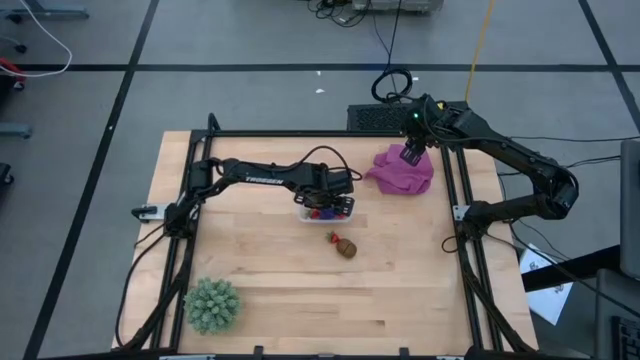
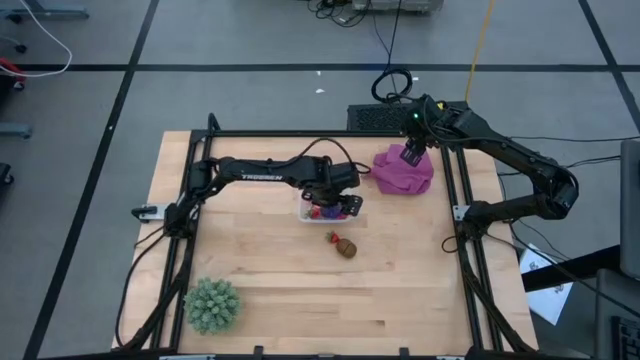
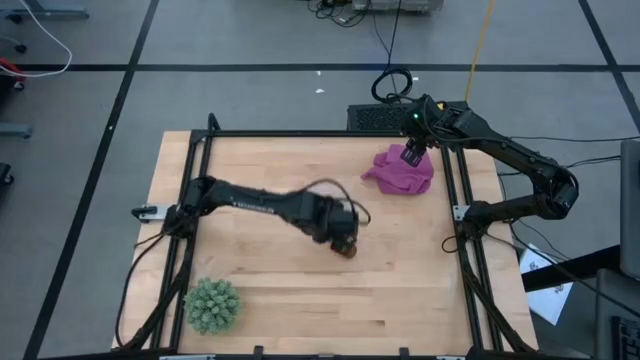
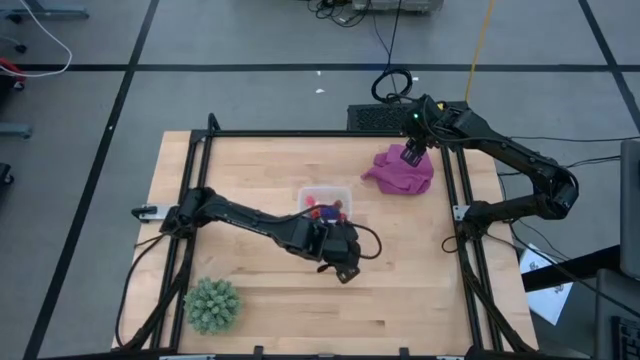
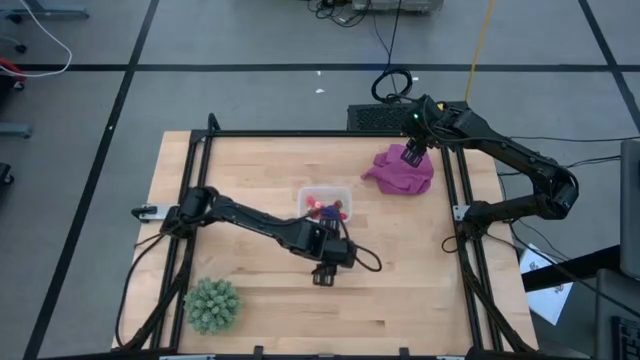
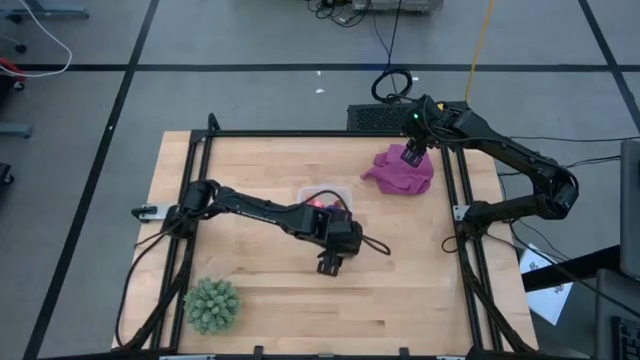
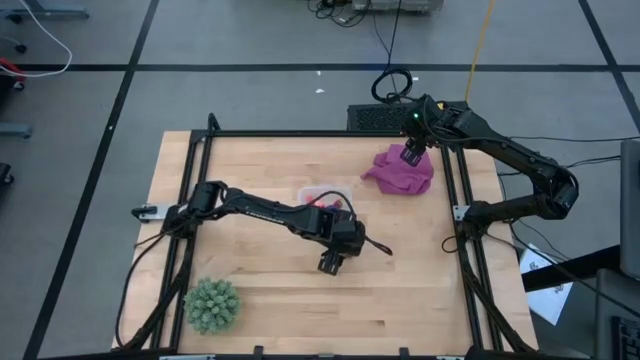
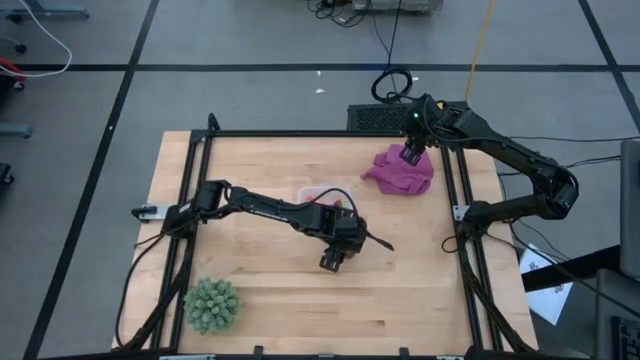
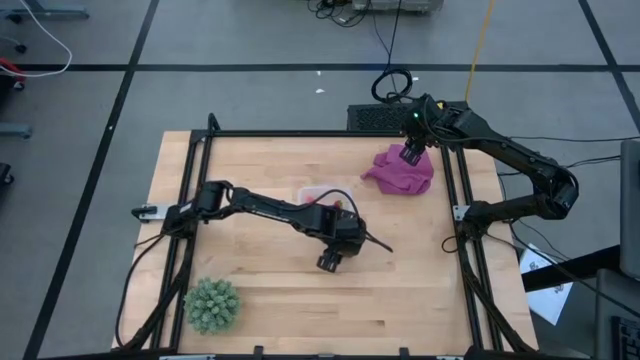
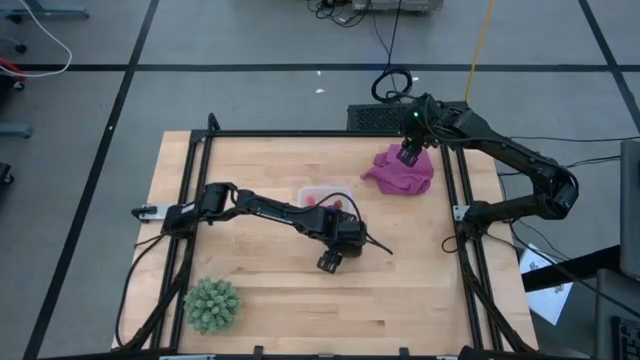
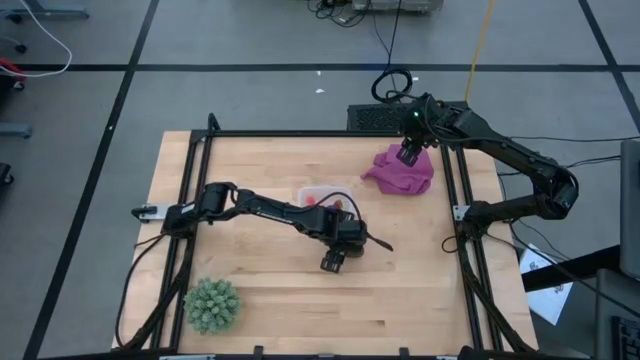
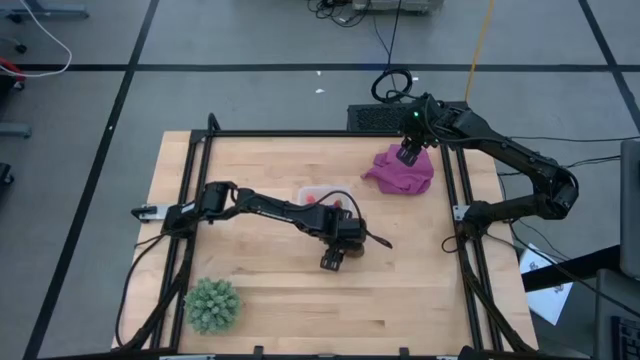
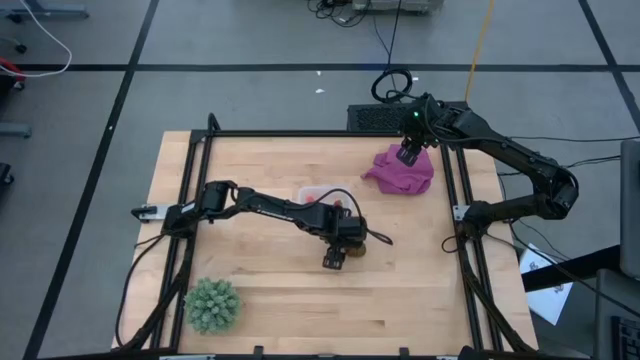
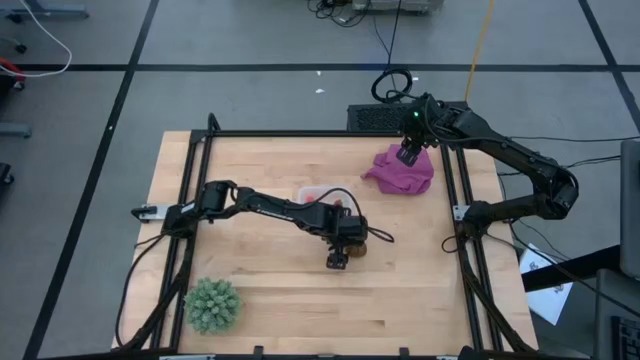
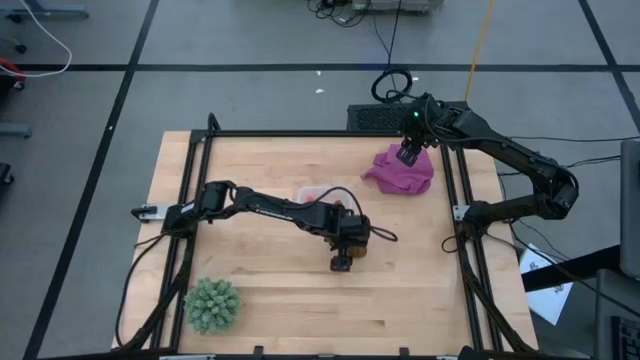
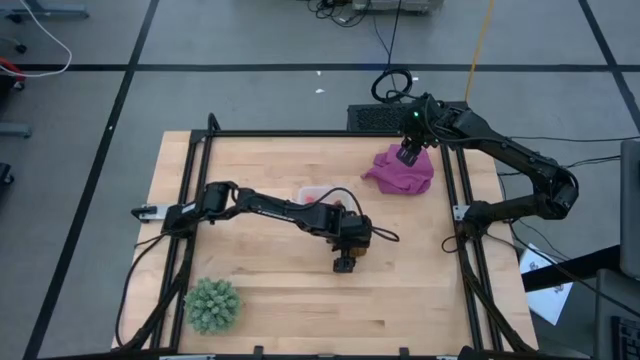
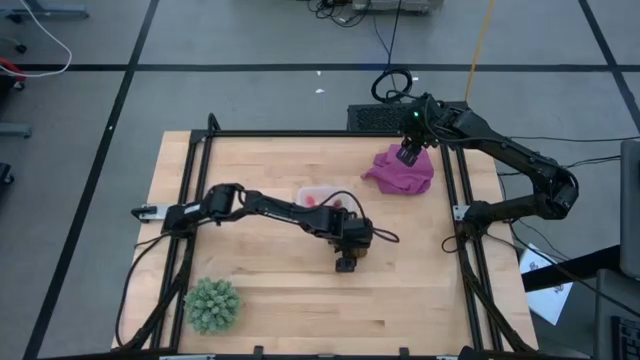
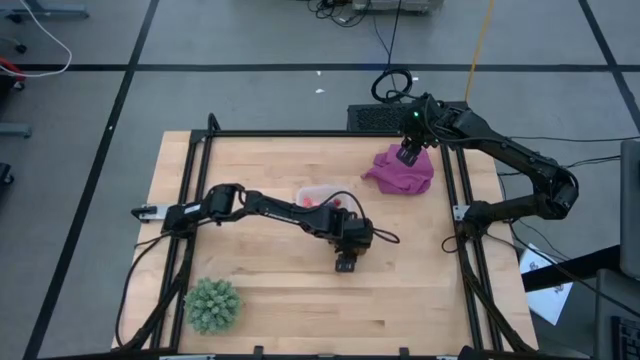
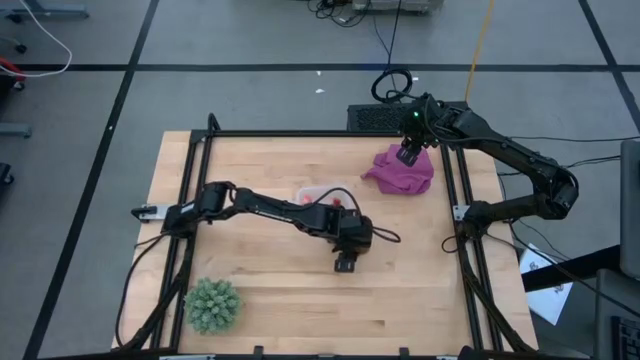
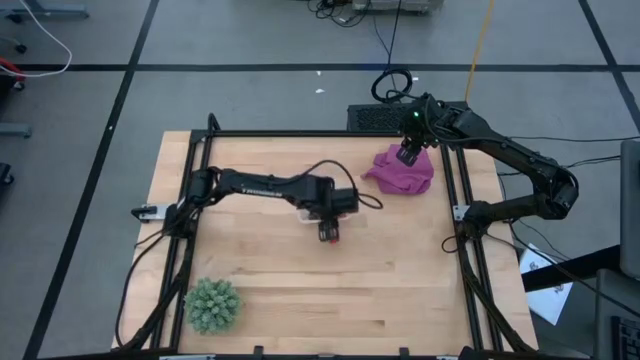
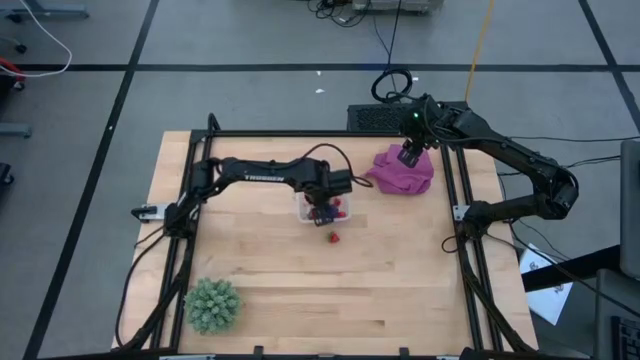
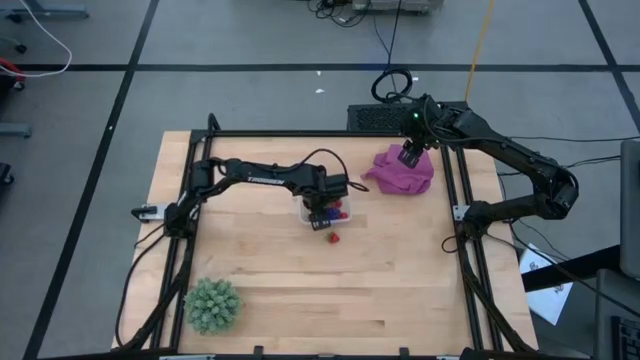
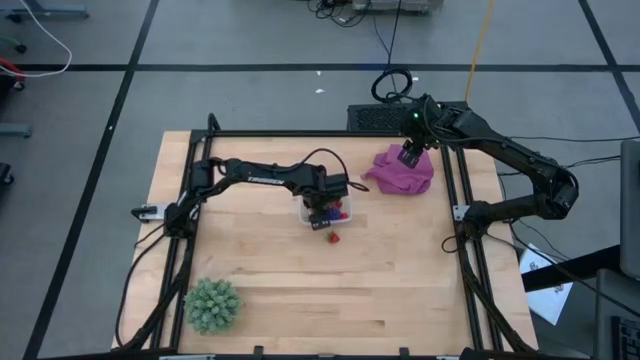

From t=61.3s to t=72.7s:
Task: Pick and placing Produce into tupperware
Put the kiwi into the transparent bin

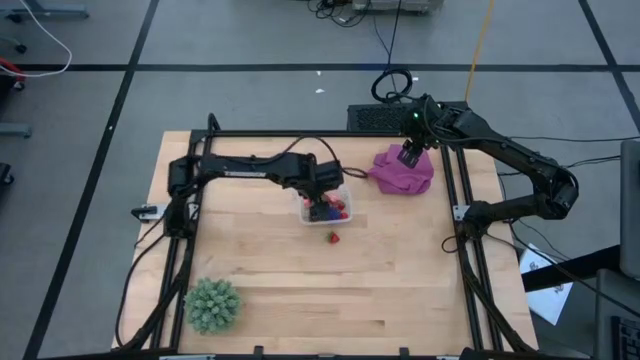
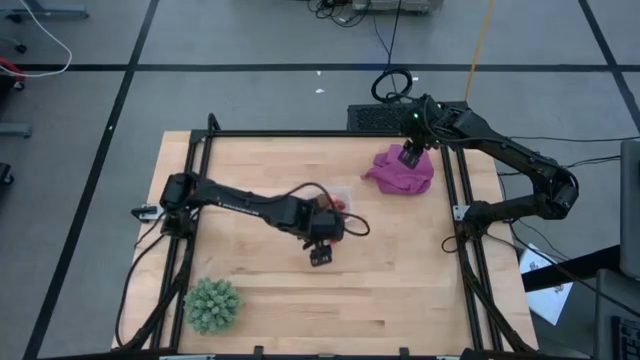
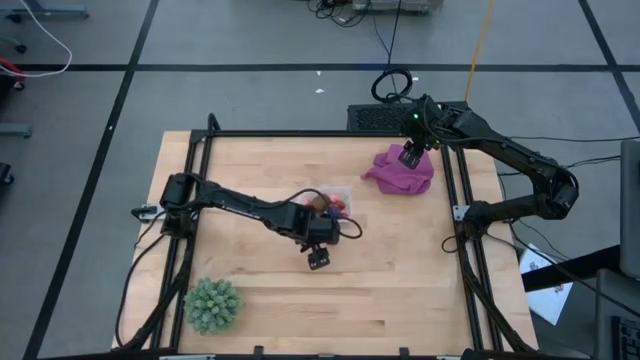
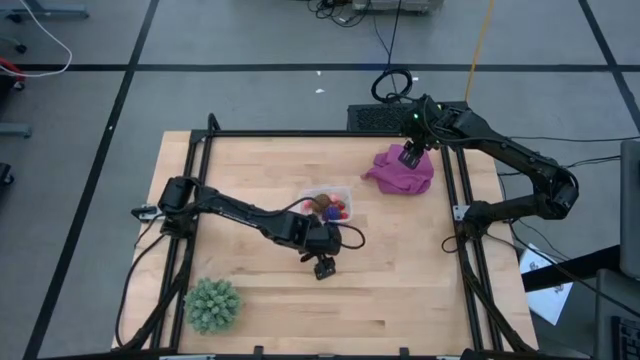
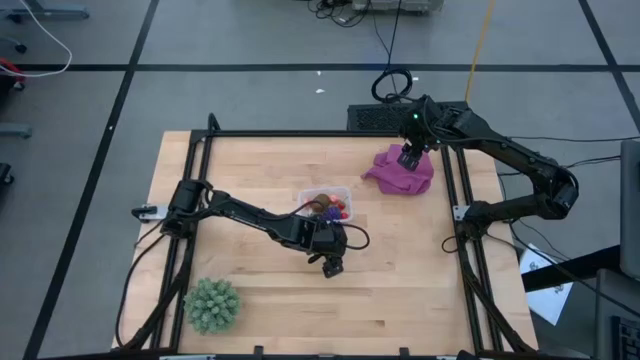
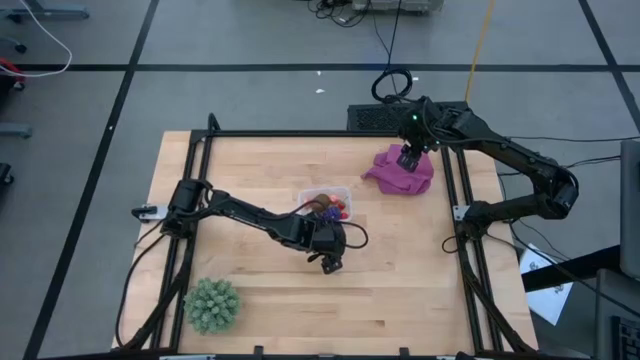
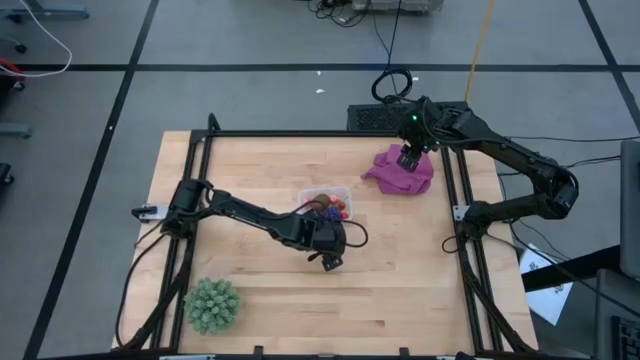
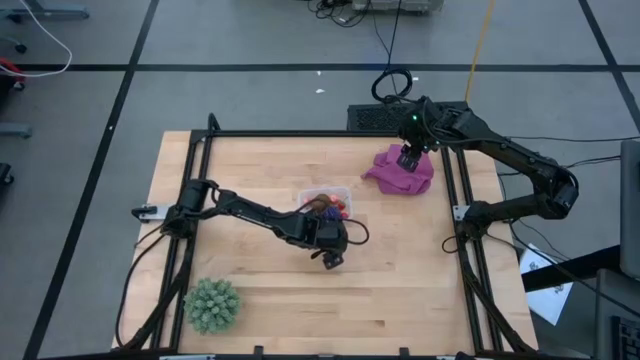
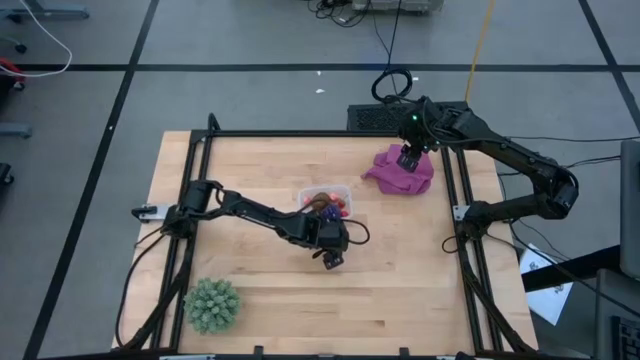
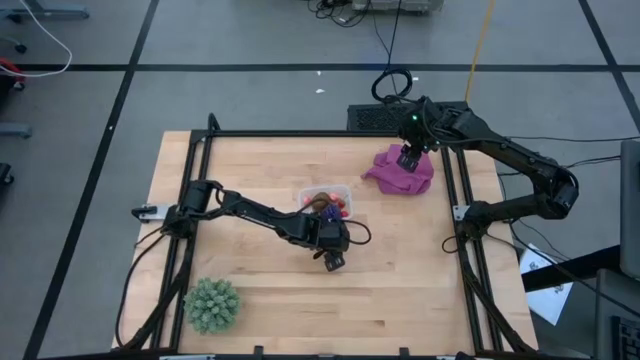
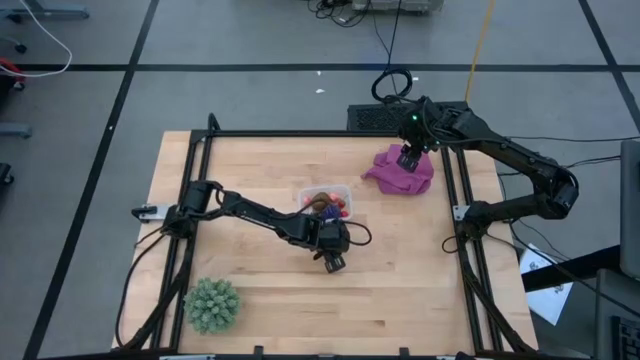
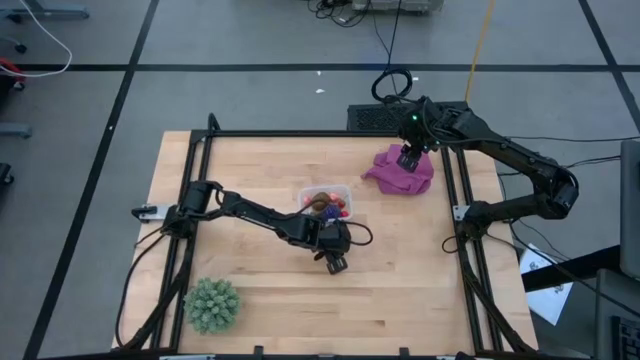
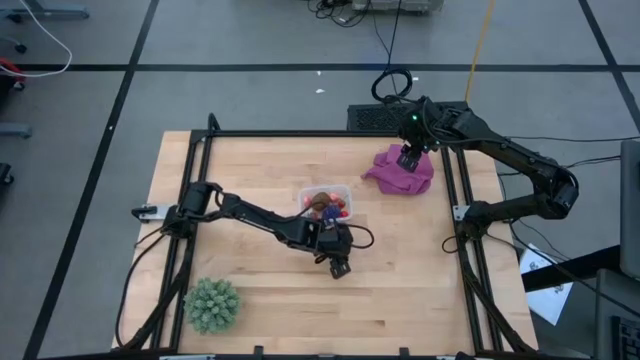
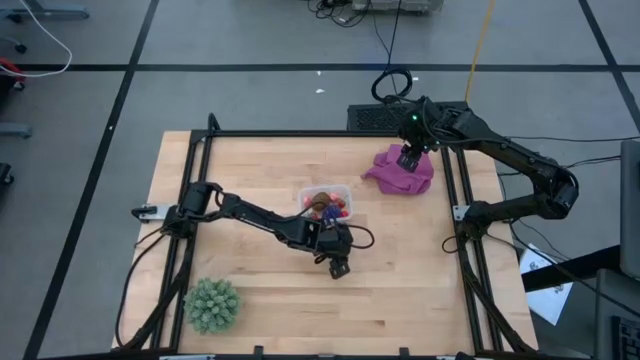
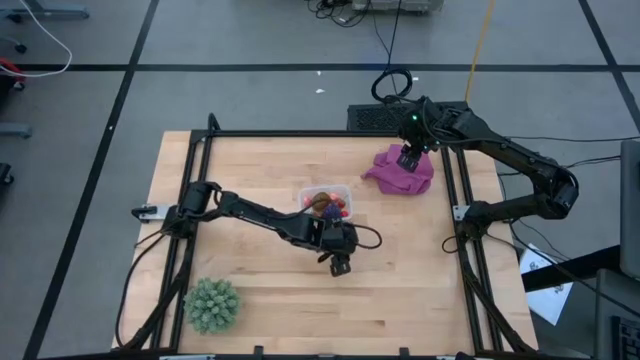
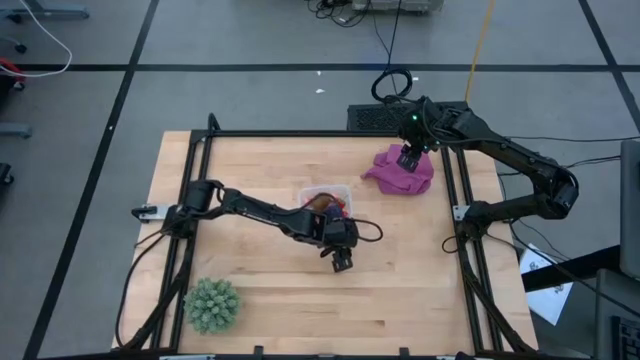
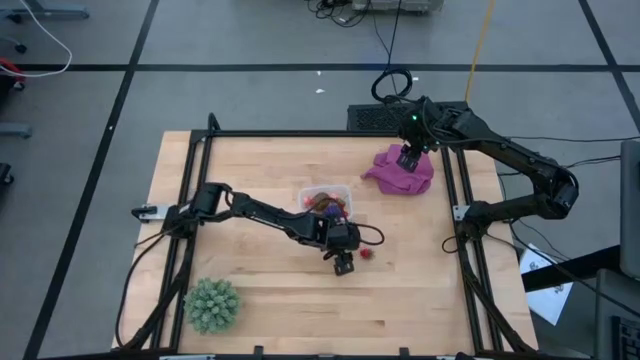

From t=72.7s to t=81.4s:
Put the strawberry into the transparent bin

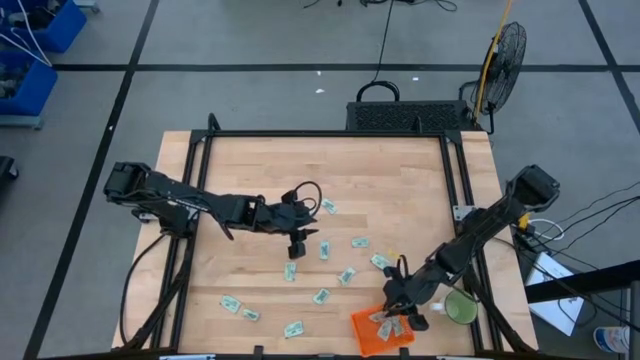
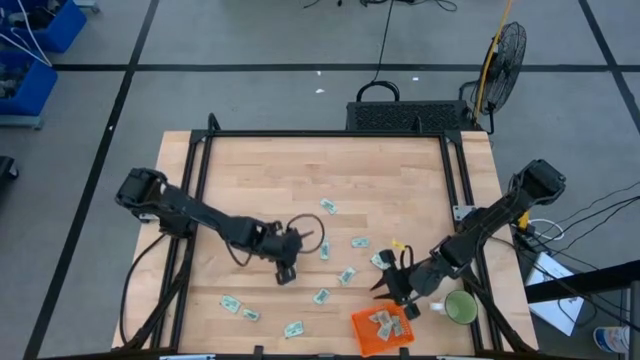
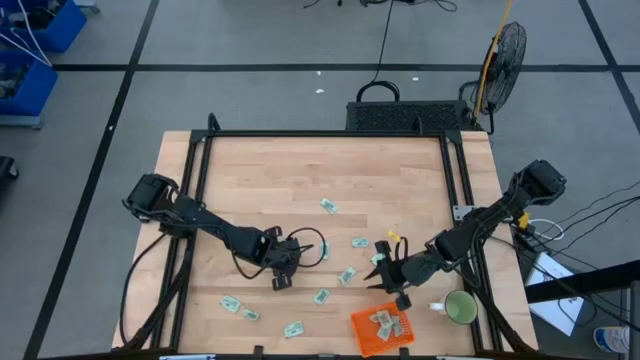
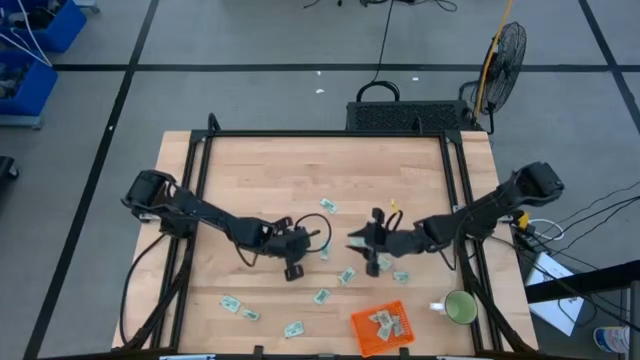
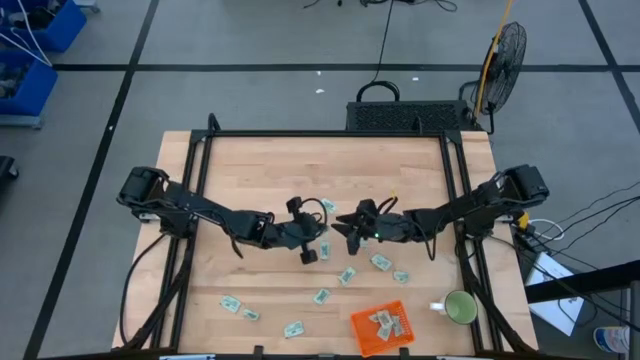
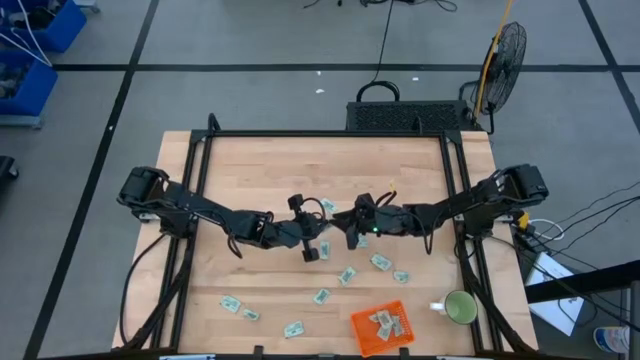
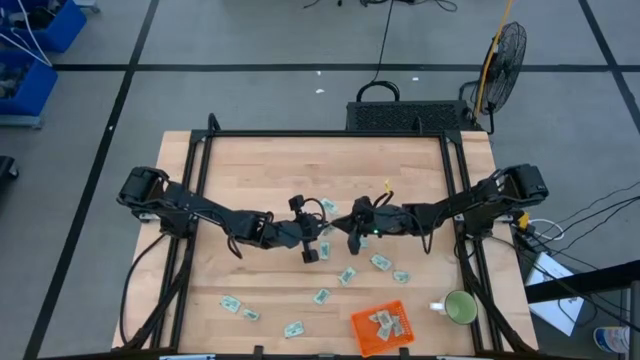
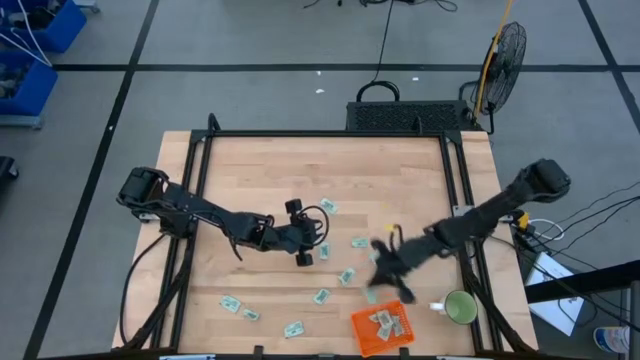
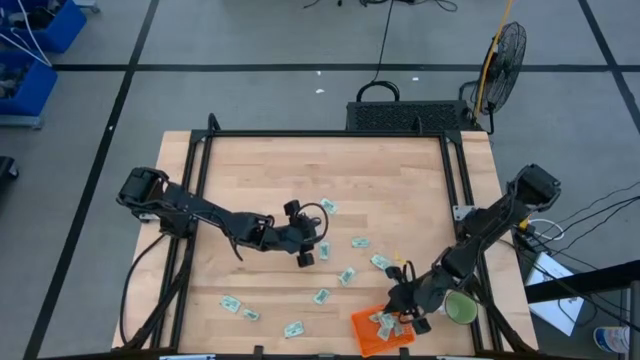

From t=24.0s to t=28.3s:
Task: Pick and place Stevia / Truvia into bins
Put the stevia packet into the orange bin
